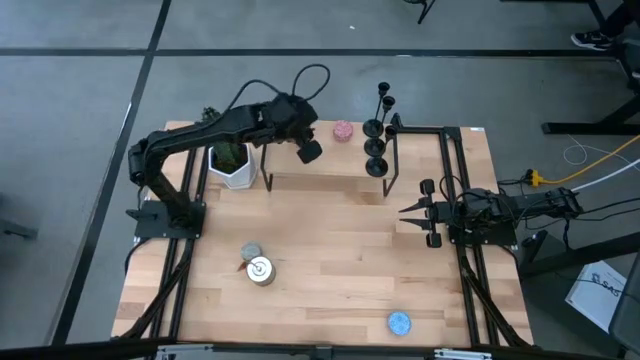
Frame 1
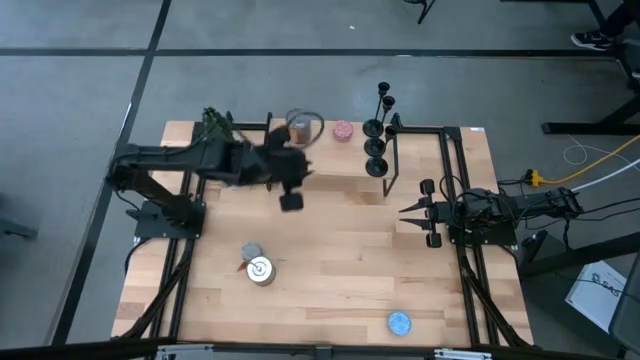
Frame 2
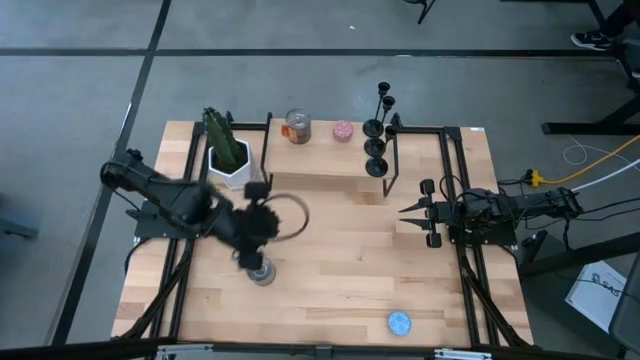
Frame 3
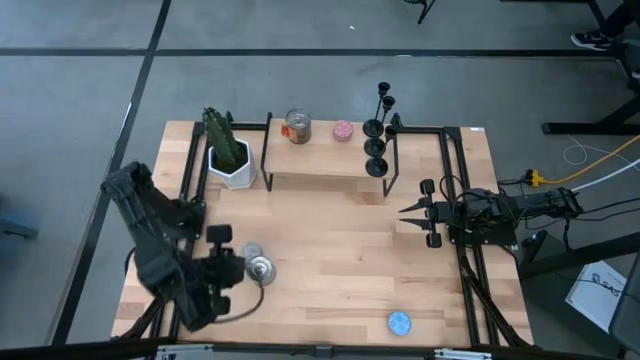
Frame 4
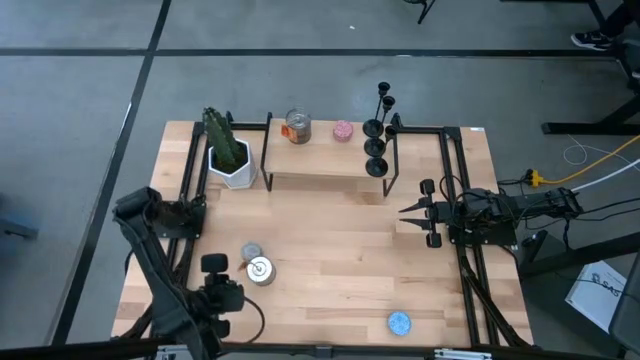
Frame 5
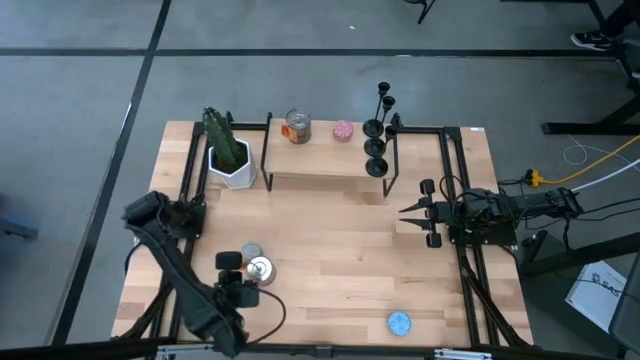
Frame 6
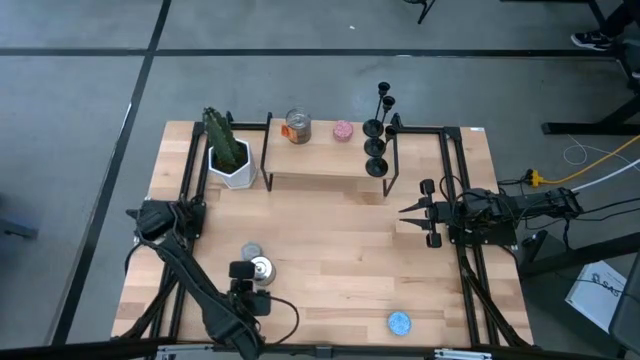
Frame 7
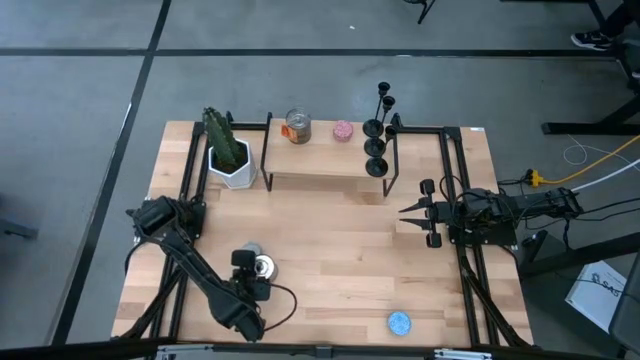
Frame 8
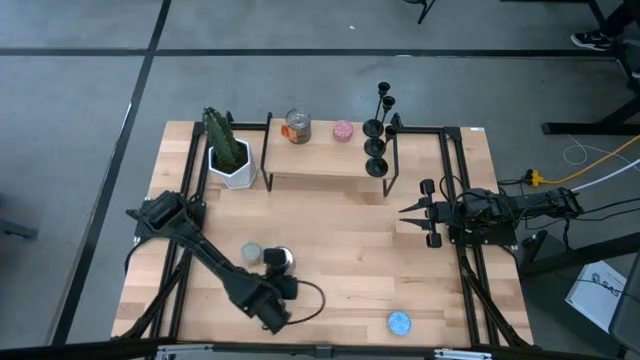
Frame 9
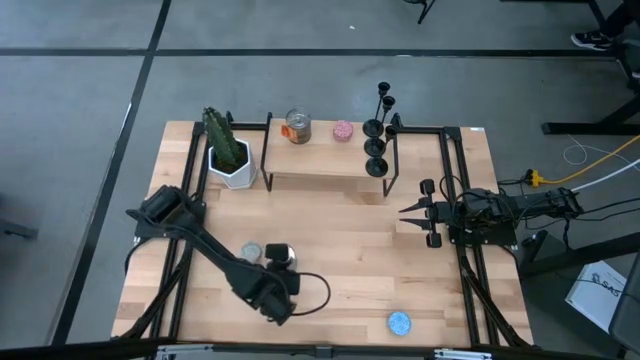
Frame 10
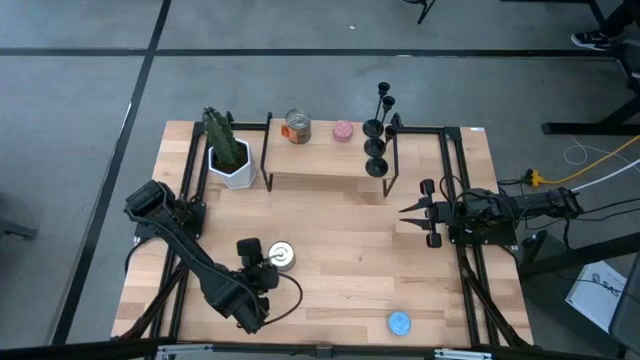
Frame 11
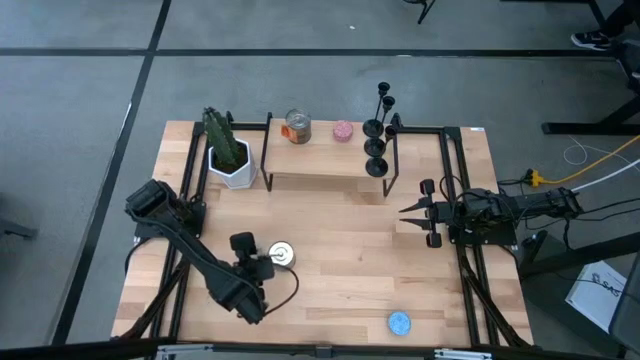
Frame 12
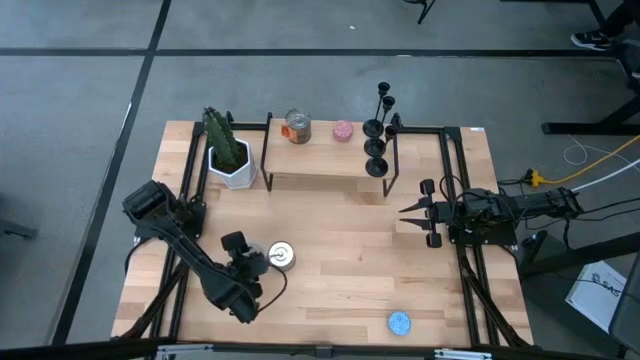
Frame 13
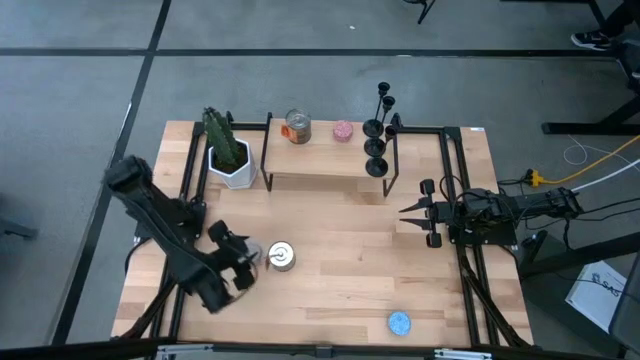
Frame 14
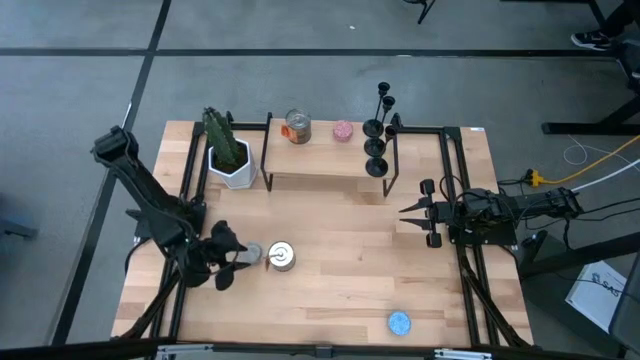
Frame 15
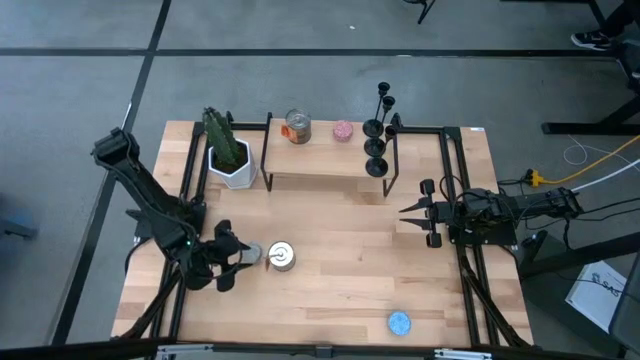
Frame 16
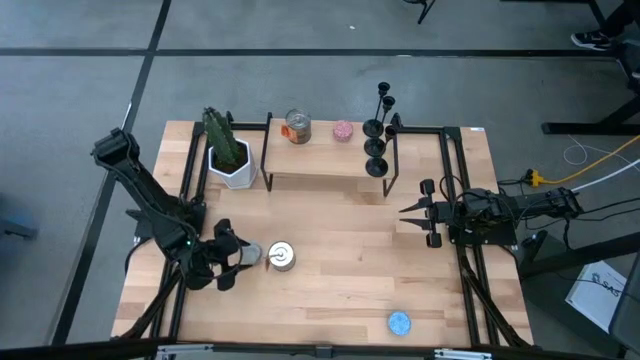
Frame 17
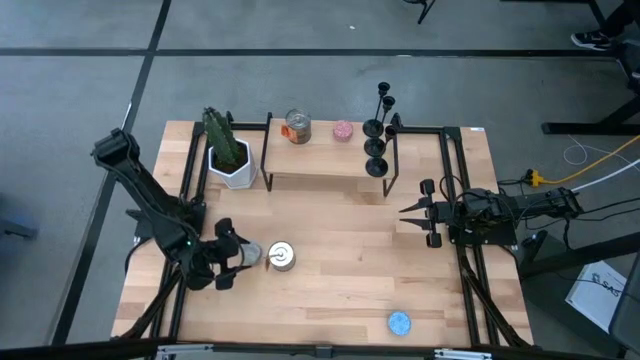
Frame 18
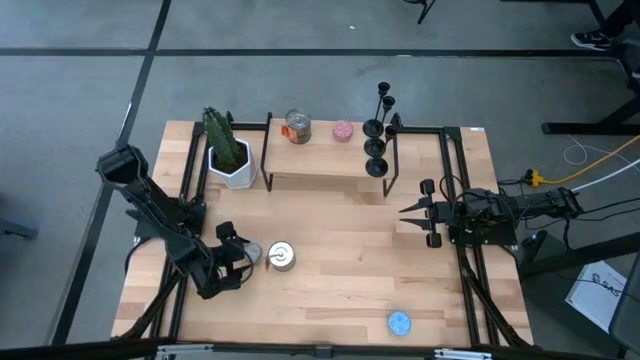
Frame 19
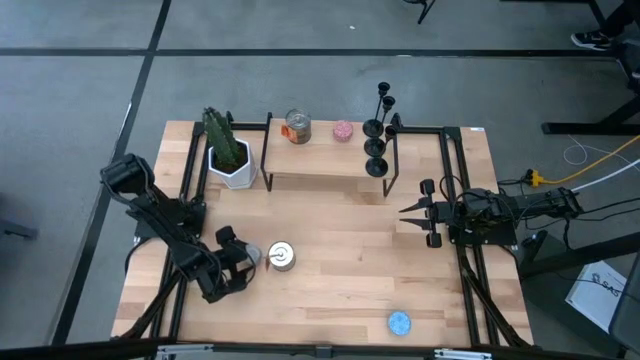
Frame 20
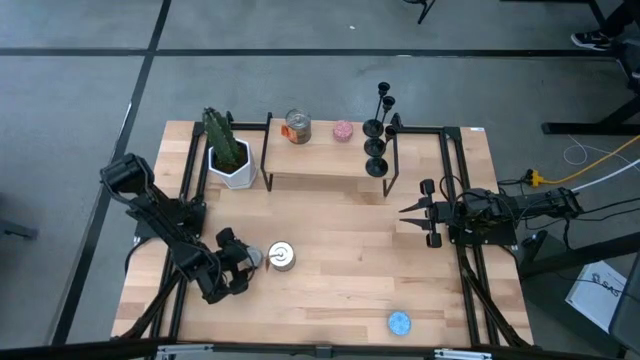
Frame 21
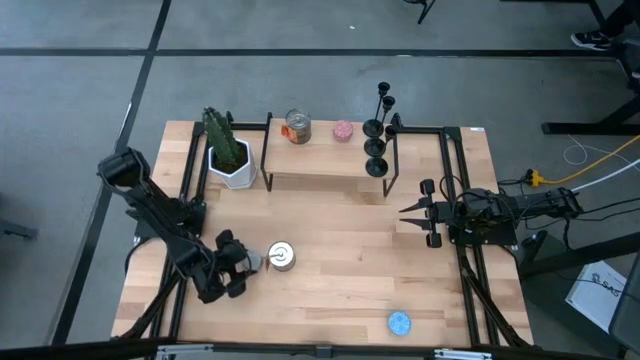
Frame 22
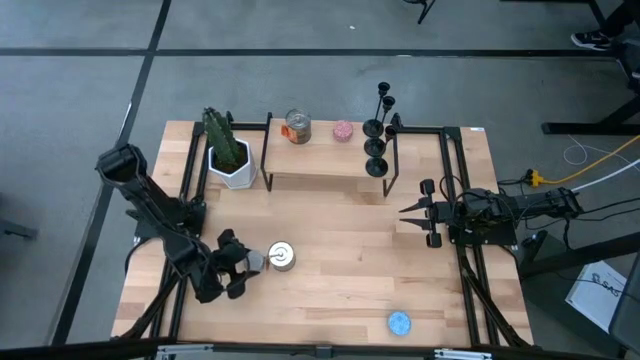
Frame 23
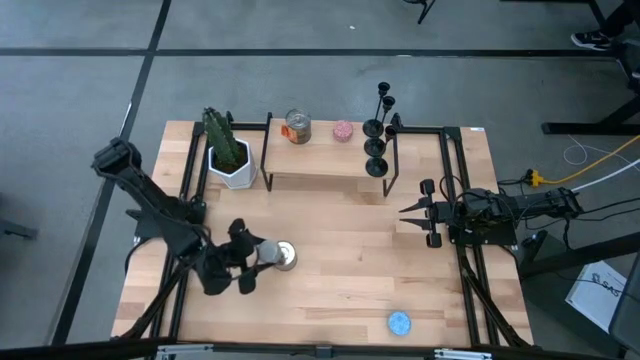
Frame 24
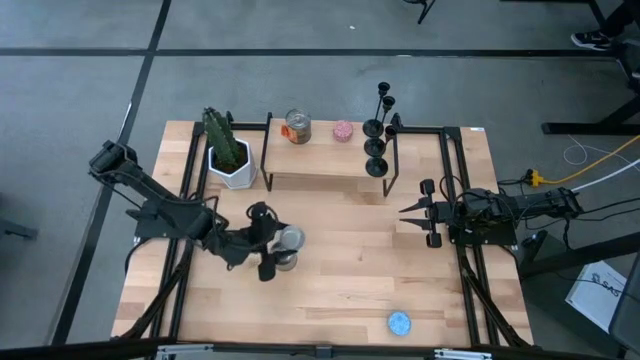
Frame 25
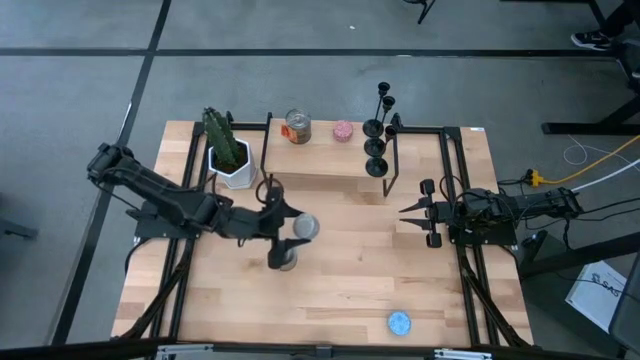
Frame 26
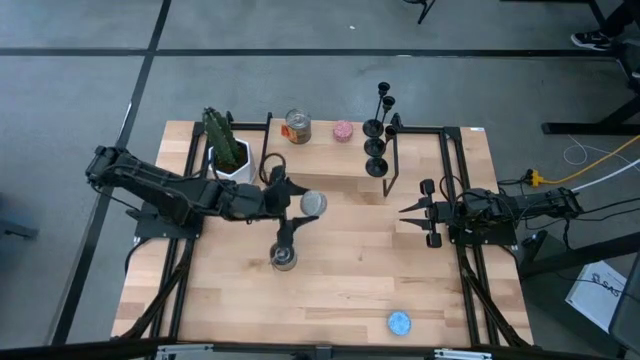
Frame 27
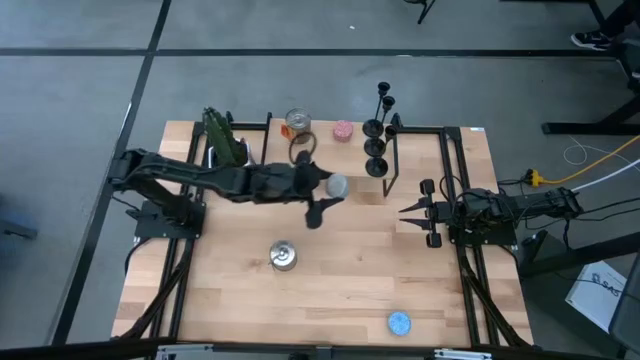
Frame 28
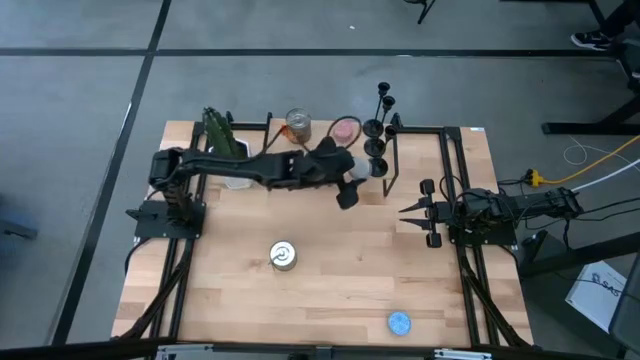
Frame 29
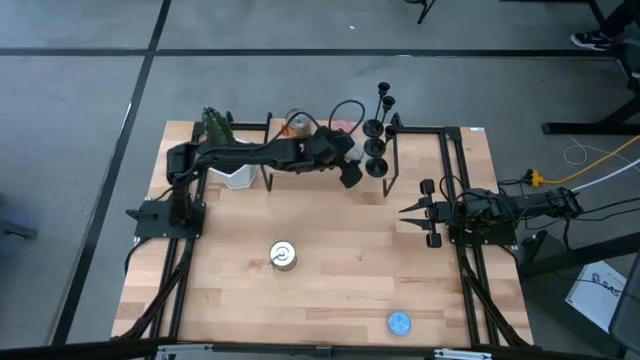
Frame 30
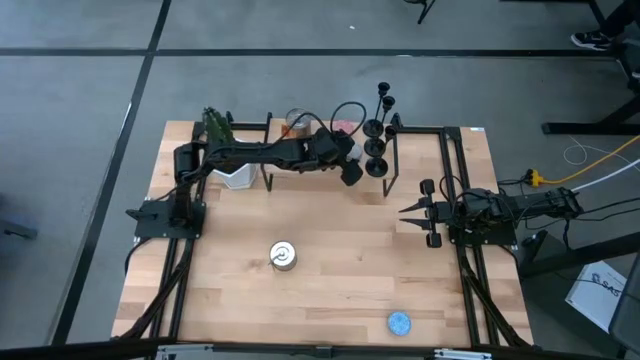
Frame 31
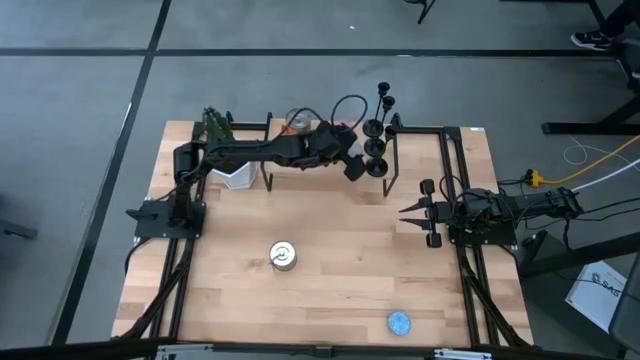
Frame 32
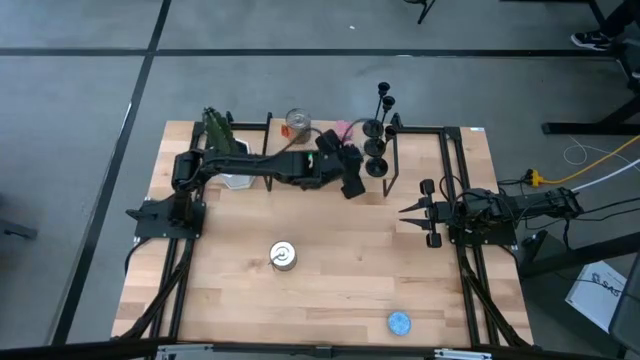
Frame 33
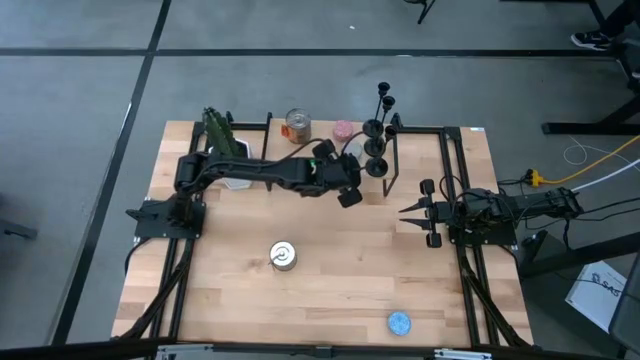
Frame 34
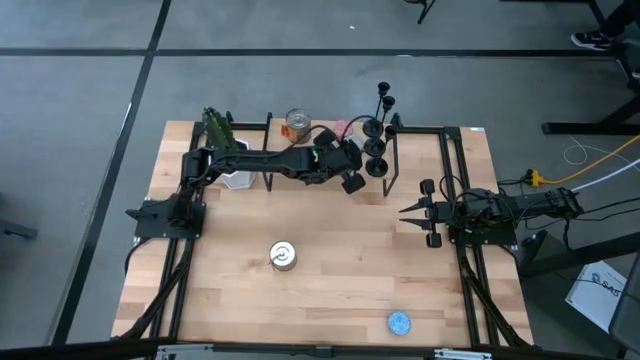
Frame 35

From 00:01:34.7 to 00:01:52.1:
Task: Pick & Place candle stick holders
Put the light blue scented candle on the shelf

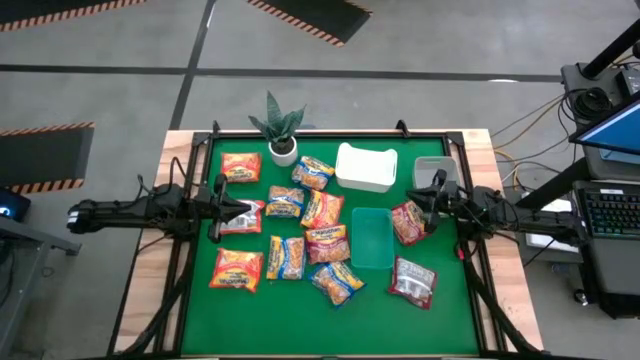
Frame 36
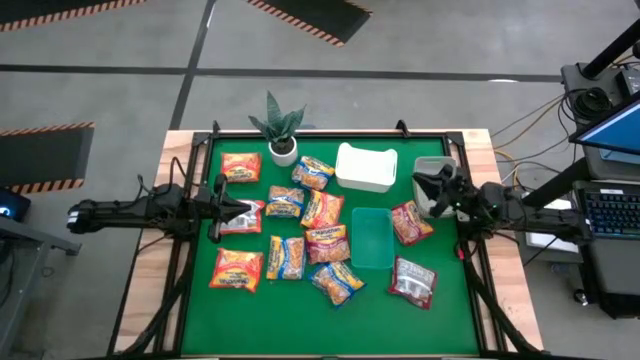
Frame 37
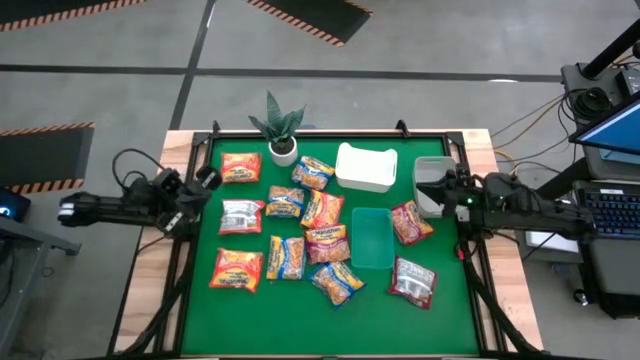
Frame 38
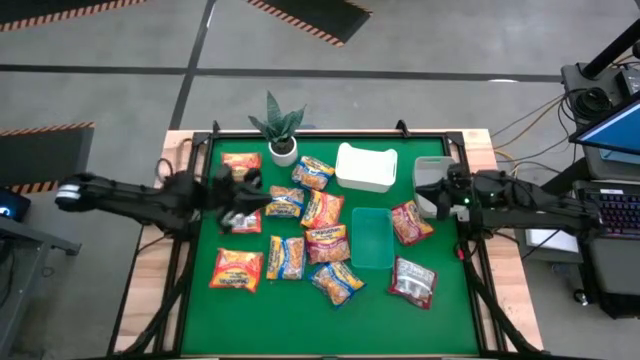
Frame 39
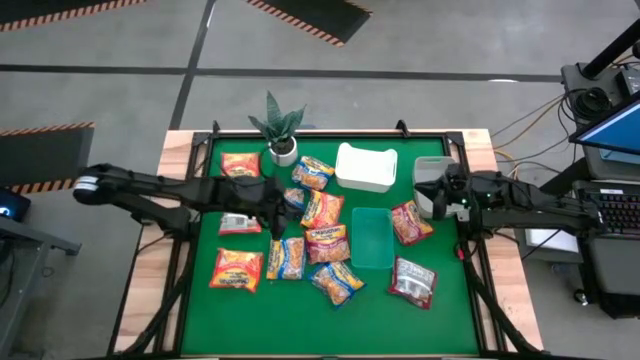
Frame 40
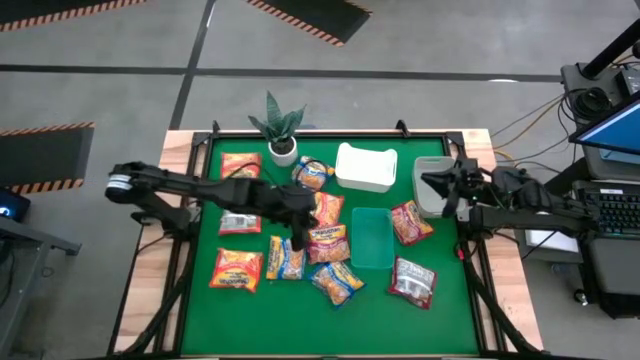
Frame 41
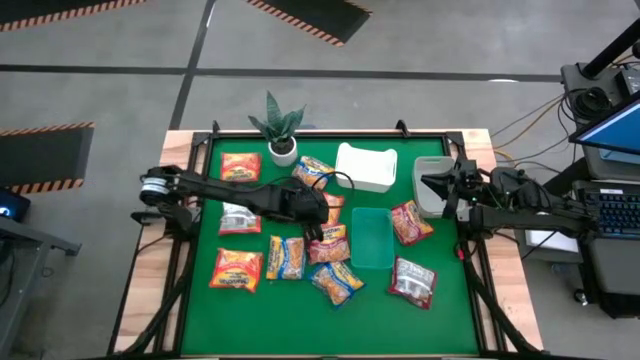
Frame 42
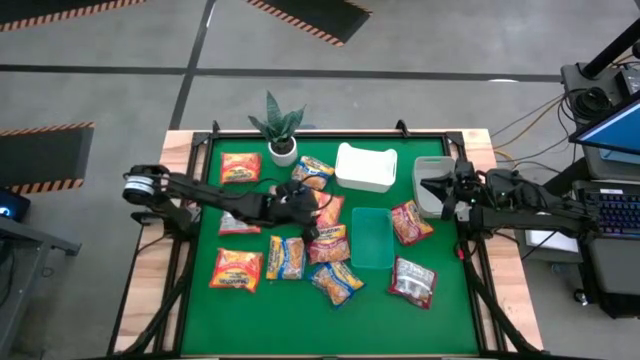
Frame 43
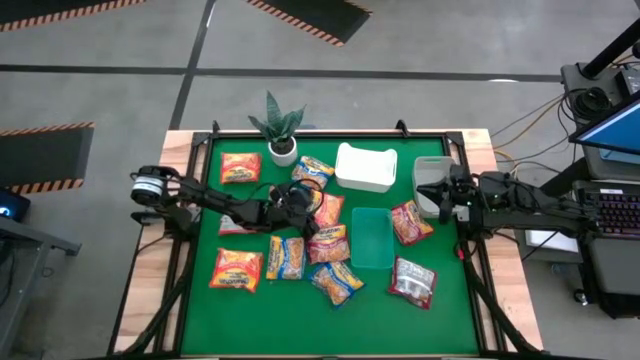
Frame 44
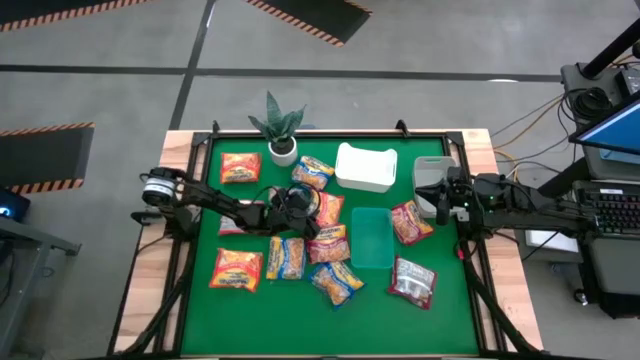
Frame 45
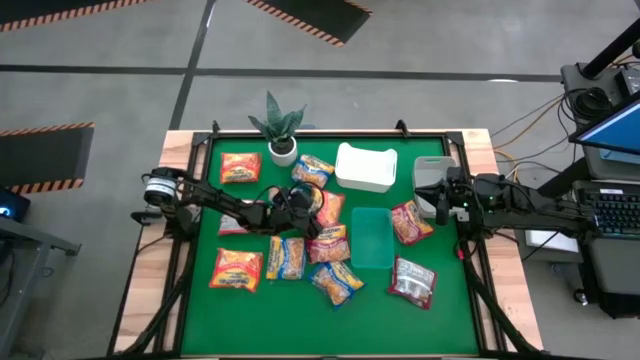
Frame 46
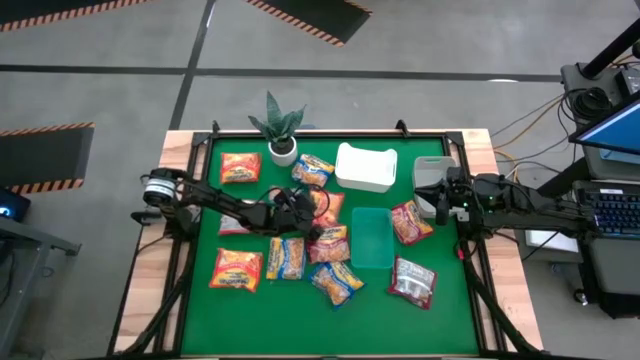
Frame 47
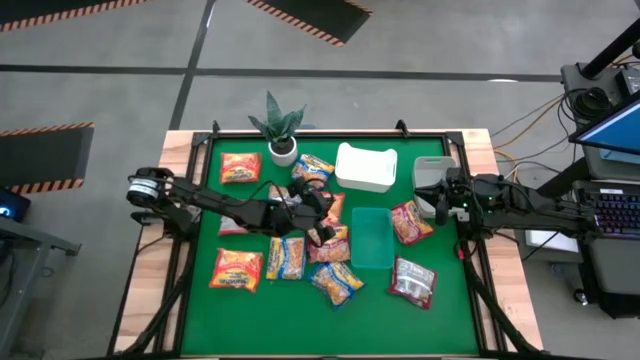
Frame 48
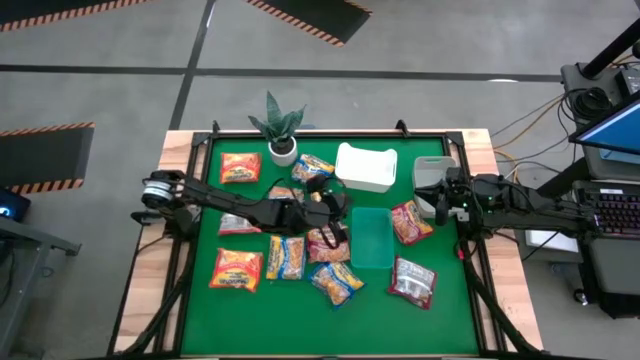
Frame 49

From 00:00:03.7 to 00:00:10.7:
Task: Sort Maruchan noodles
Put the orange noodle pack into the green bin
